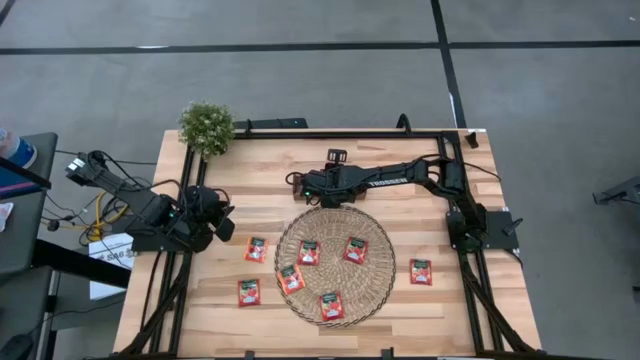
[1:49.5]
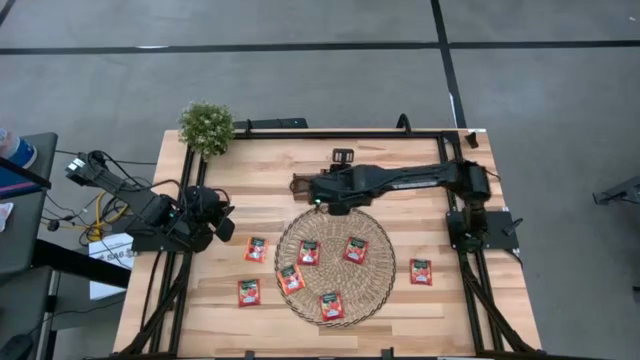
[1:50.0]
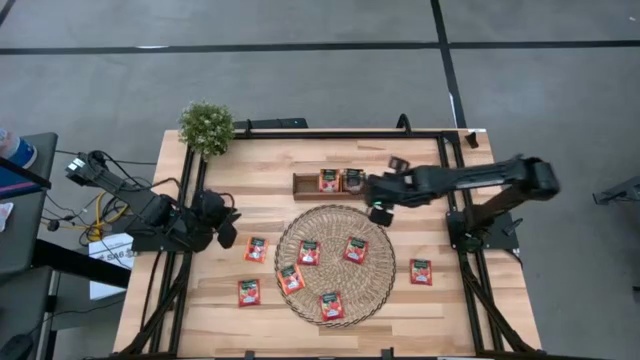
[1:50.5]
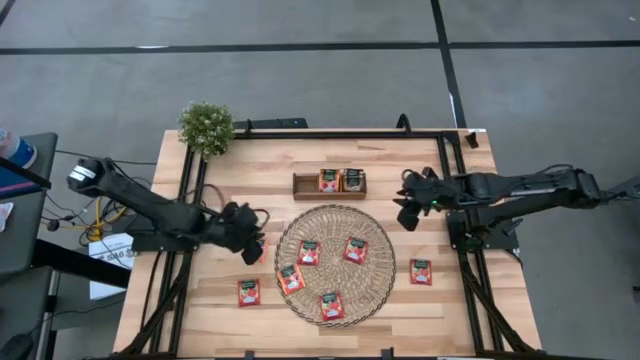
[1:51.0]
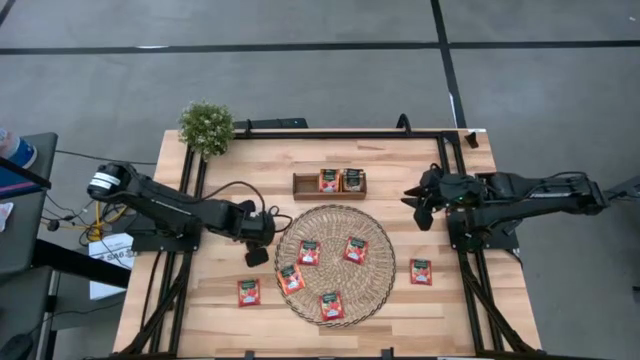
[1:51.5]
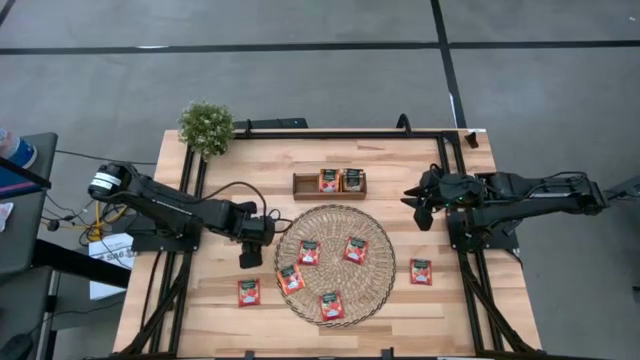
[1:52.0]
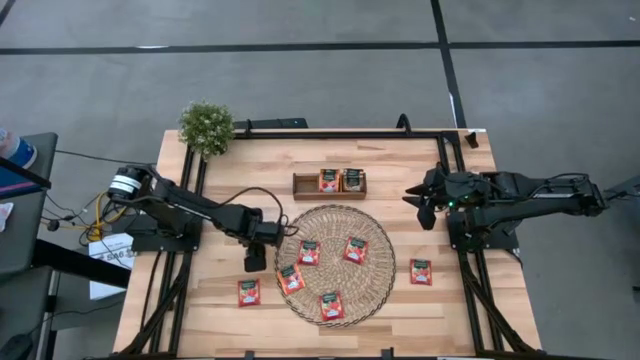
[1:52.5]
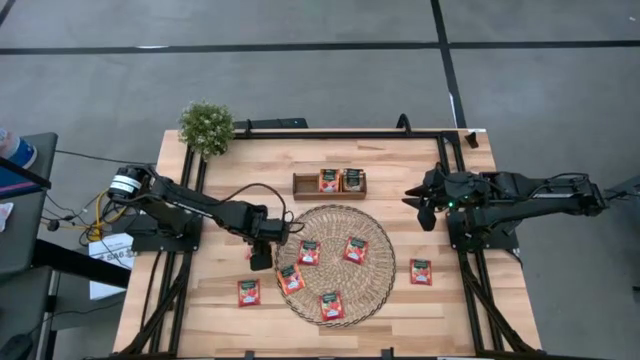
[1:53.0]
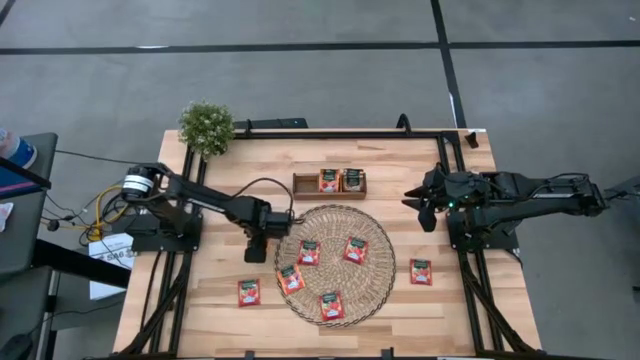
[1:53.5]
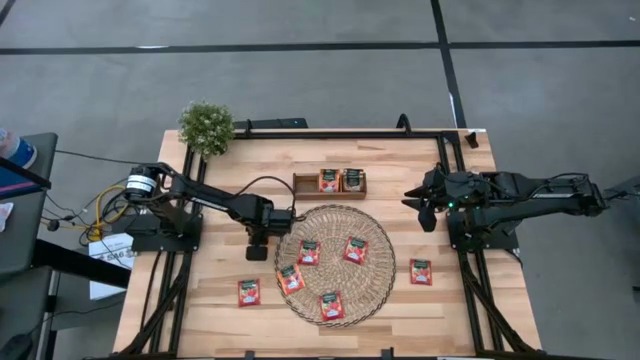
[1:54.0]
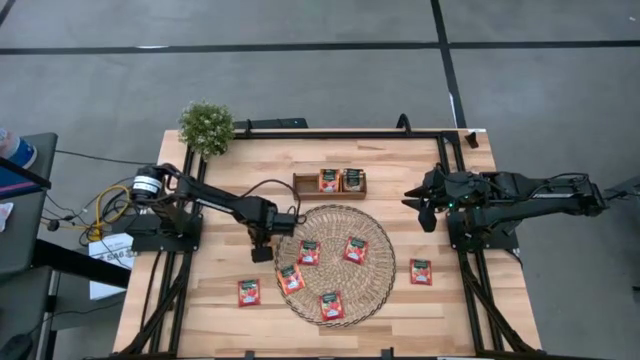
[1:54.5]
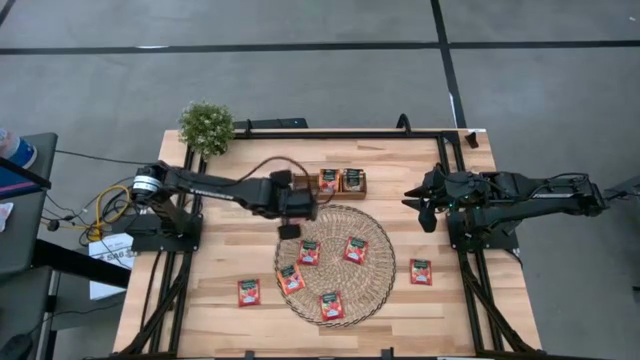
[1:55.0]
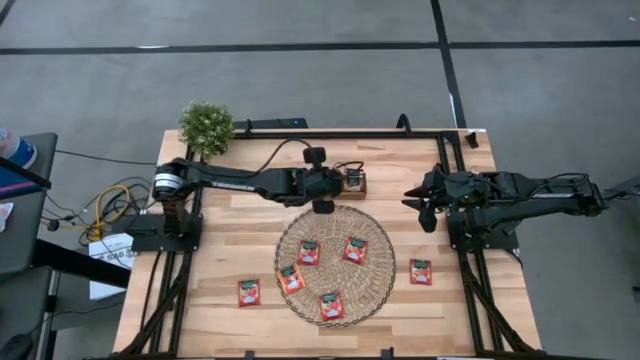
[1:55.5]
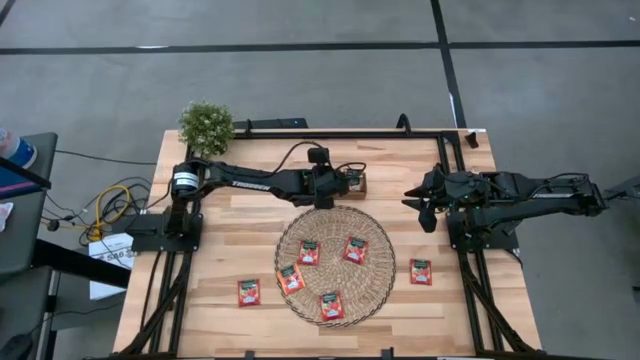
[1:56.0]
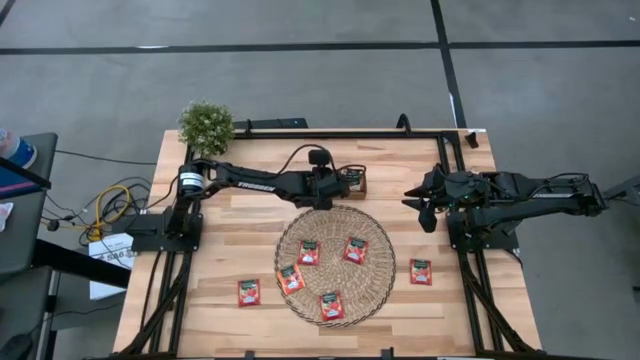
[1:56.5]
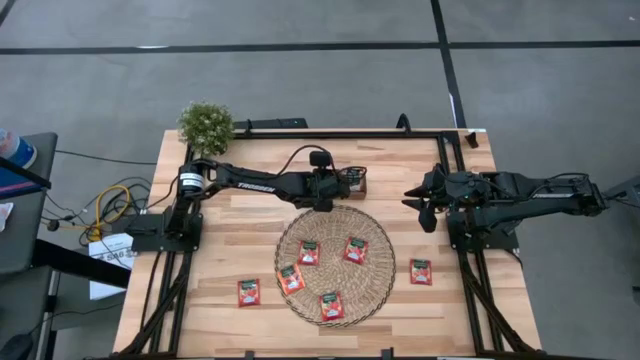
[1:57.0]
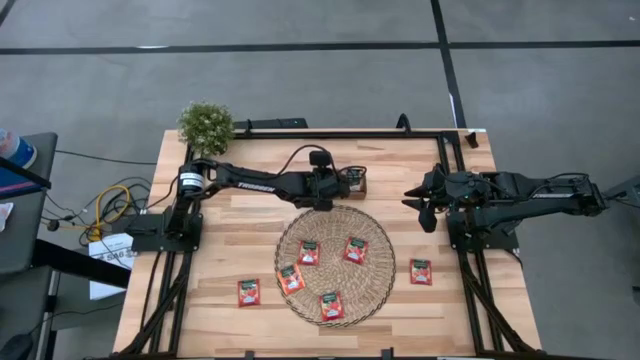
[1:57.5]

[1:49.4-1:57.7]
Task: Pick & Place Tea
Put the orange tea bag into the wooden organizer

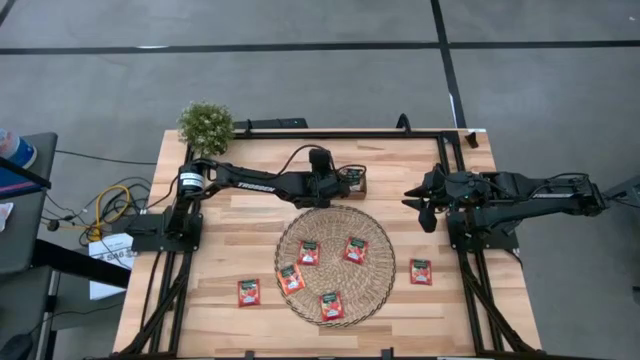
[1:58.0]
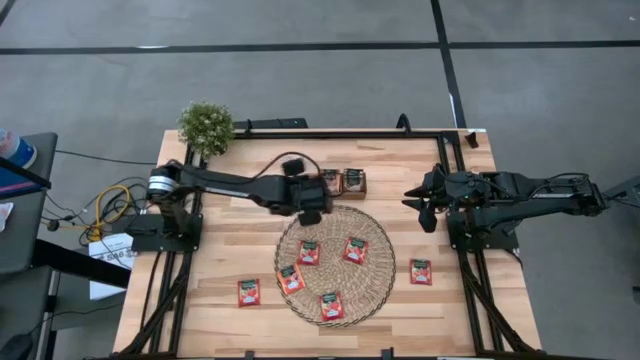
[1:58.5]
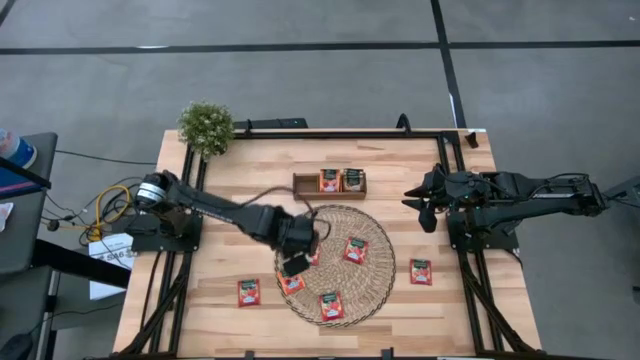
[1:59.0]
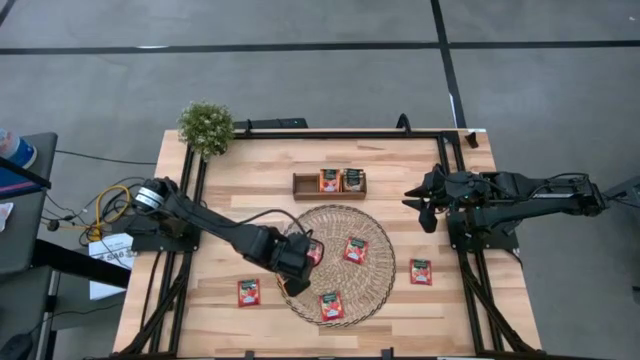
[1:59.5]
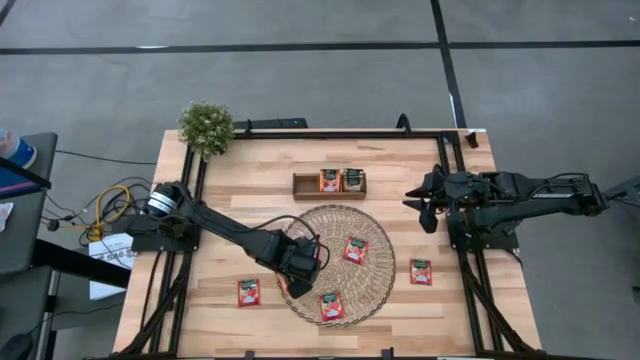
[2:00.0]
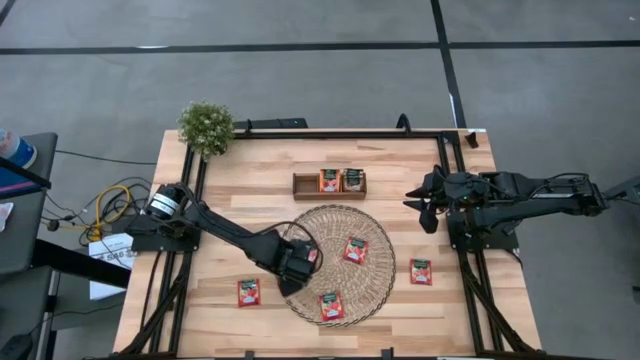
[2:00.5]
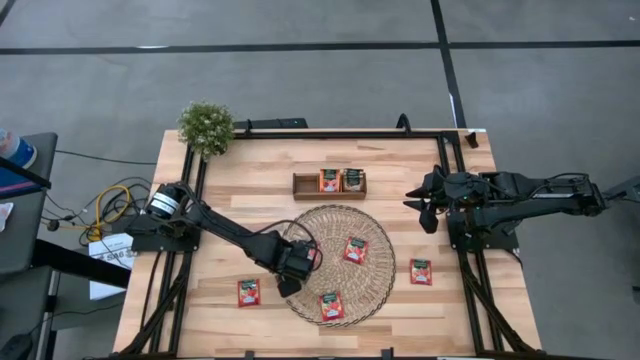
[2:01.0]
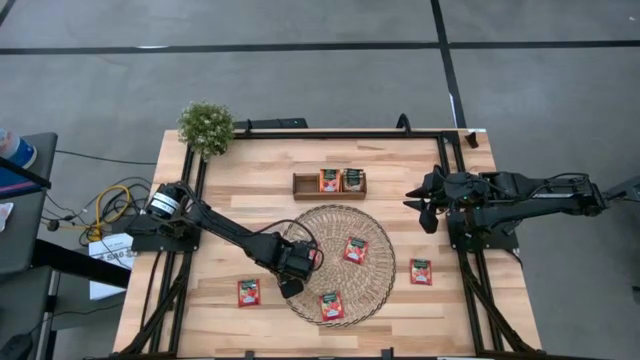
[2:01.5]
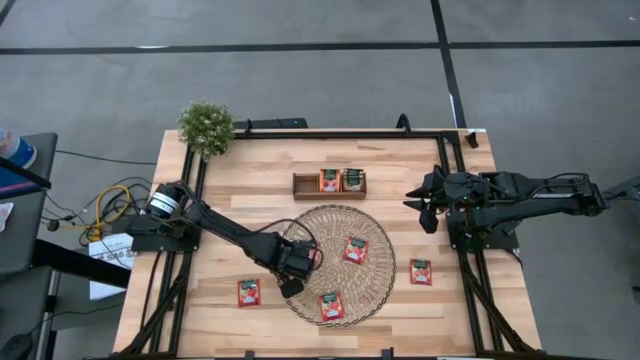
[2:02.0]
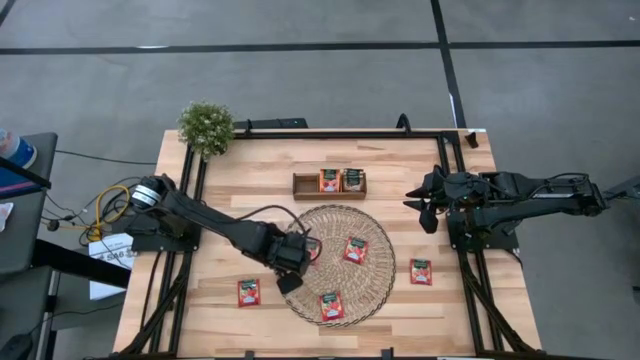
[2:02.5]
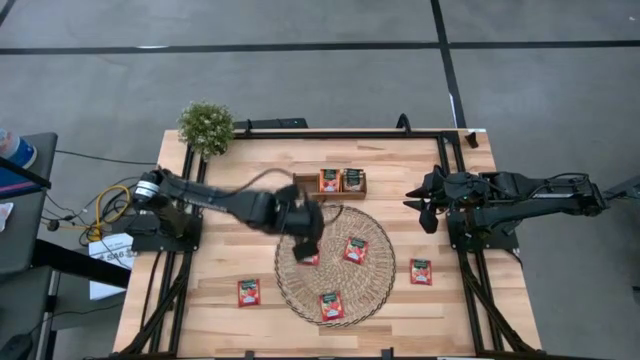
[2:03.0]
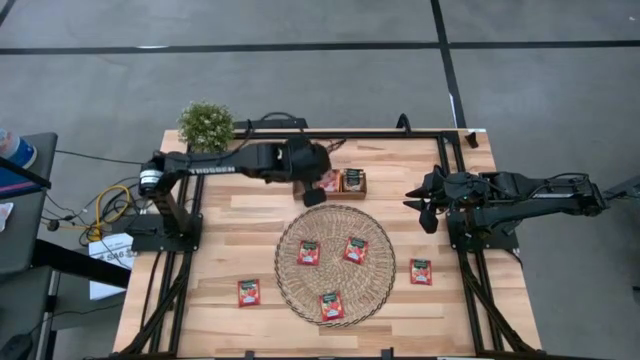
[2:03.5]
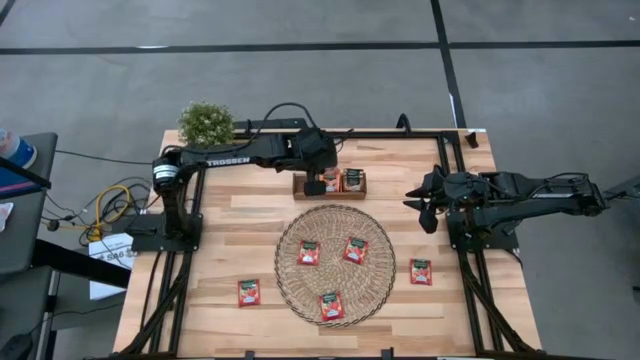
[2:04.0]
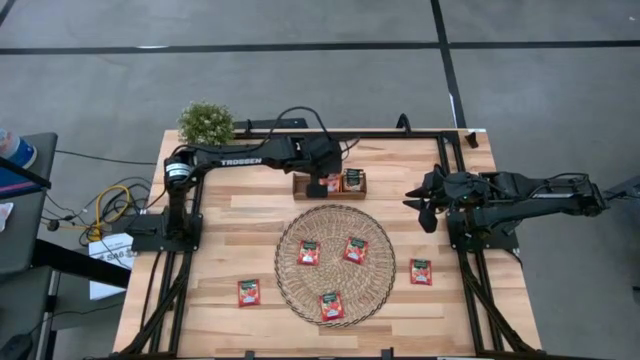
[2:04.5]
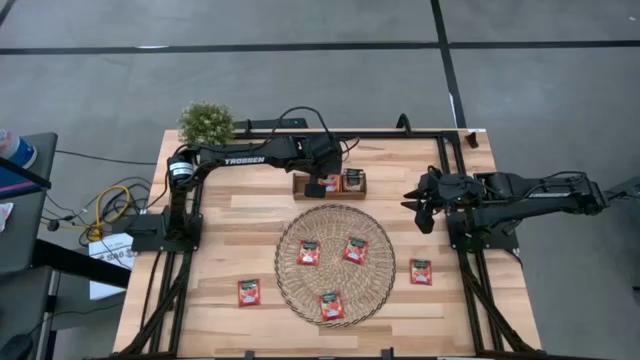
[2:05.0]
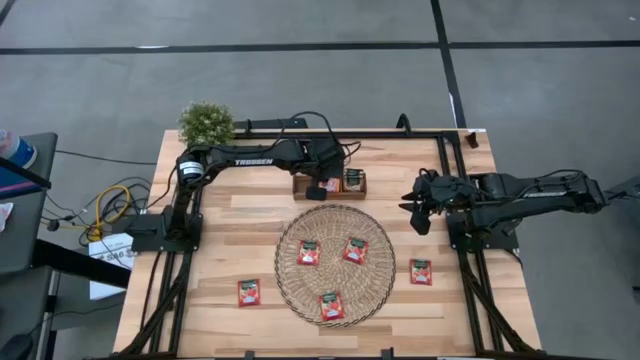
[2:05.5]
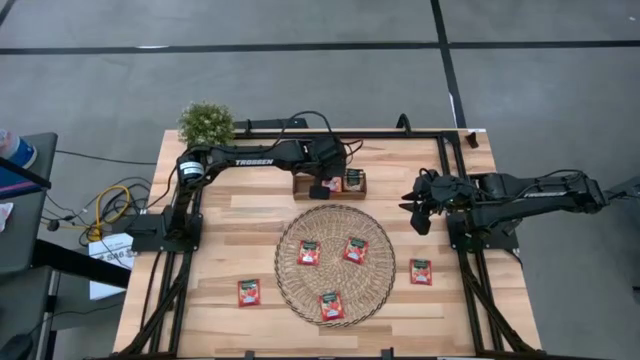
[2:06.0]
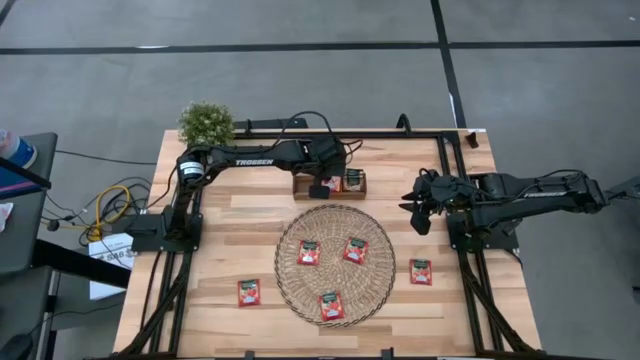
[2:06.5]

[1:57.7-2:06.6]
Put the orange tea bag into the wooden organizer

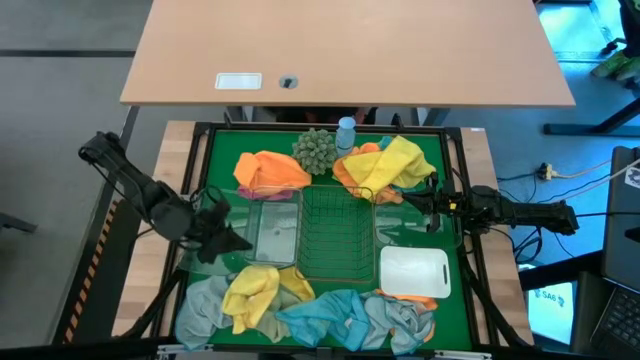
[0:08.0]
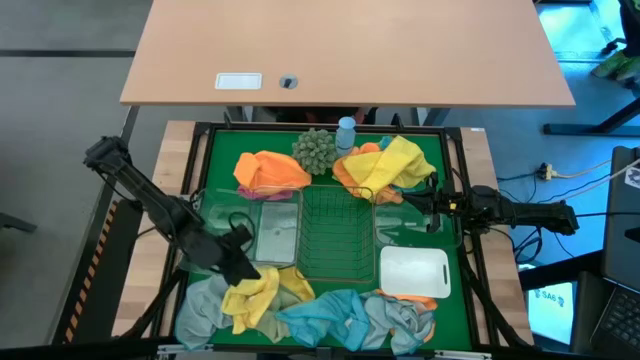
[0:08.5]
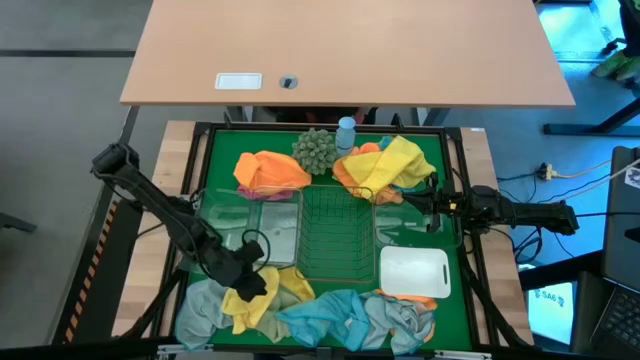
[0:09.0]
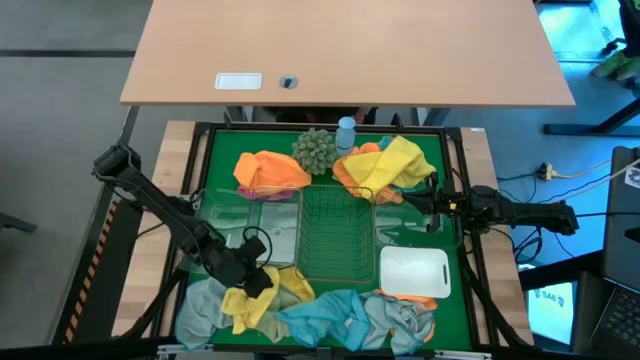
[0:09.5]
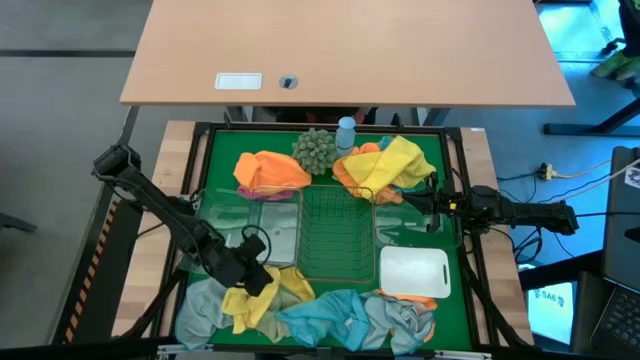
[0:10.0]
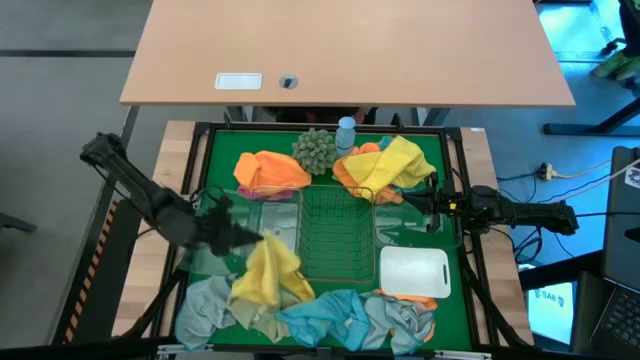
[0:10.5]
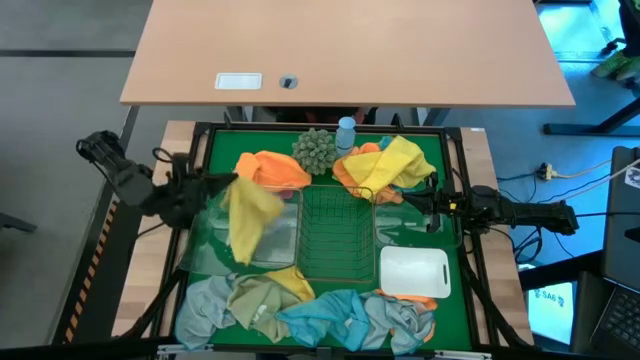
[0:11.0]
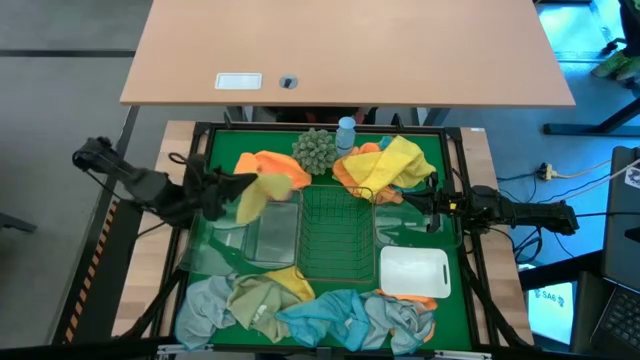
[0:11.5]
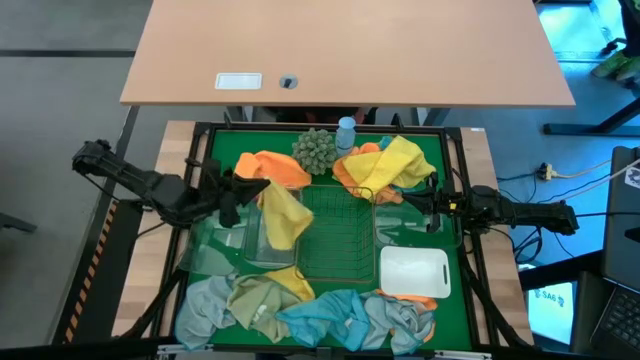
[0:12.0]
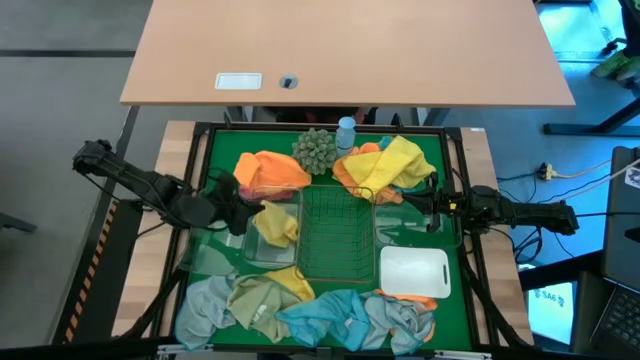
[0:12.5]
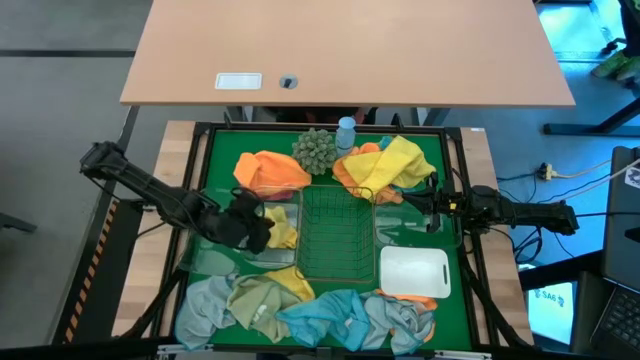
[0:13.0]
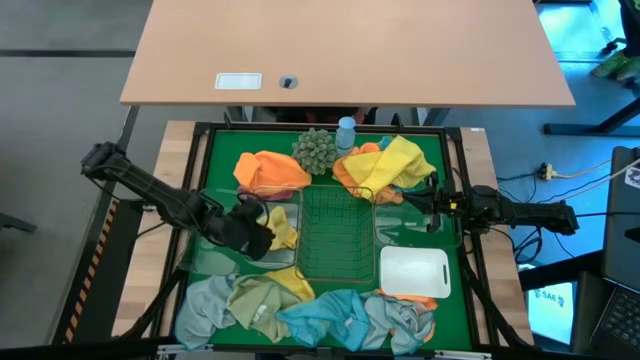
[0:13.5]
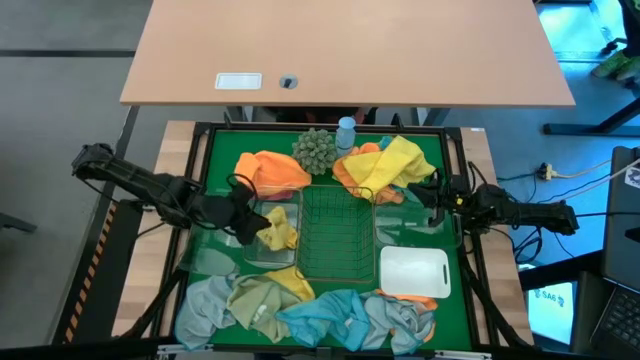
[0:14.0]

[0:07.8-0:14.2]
Task: Sort microfiber towel by color & place in baskets
Put the bottom left yellow microfiber cloth into the middle transparent bin
